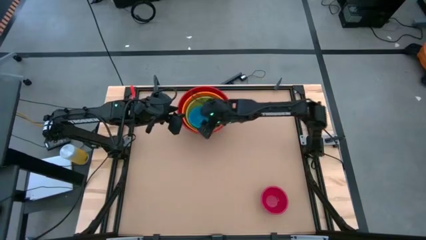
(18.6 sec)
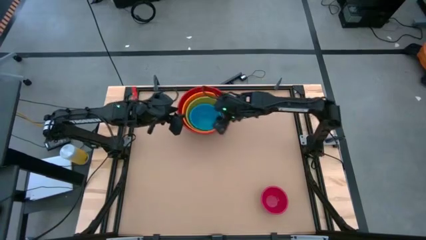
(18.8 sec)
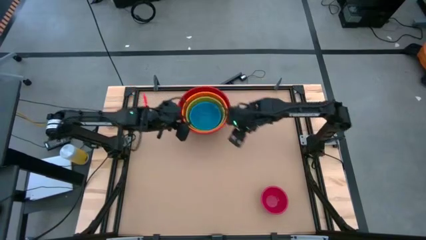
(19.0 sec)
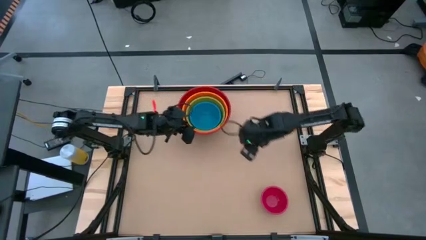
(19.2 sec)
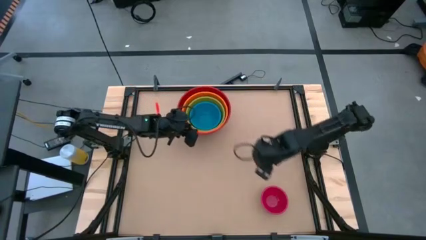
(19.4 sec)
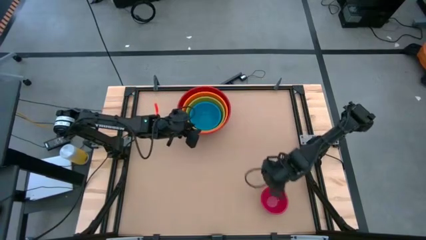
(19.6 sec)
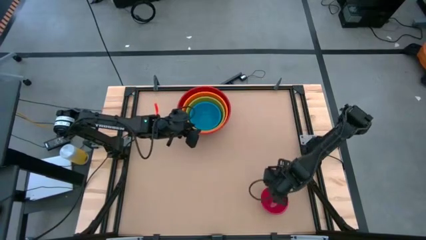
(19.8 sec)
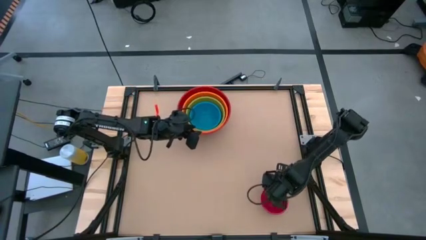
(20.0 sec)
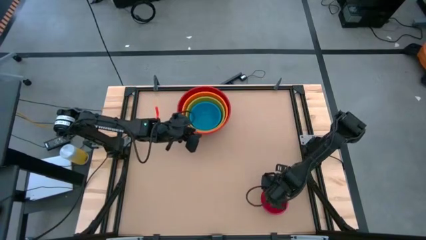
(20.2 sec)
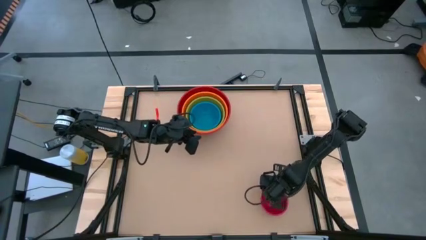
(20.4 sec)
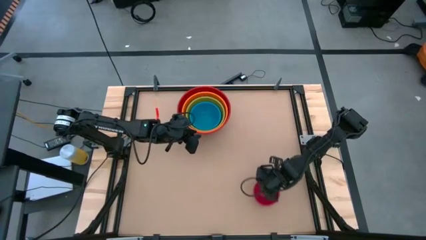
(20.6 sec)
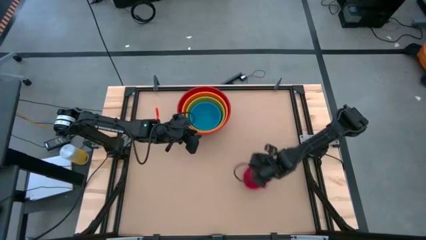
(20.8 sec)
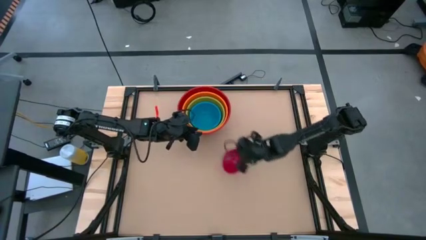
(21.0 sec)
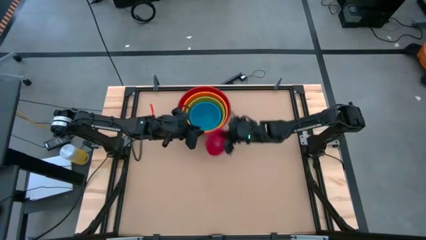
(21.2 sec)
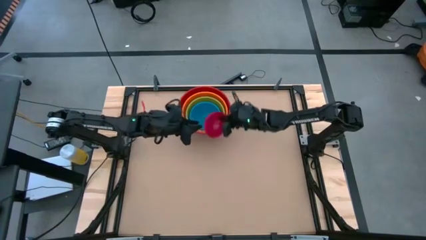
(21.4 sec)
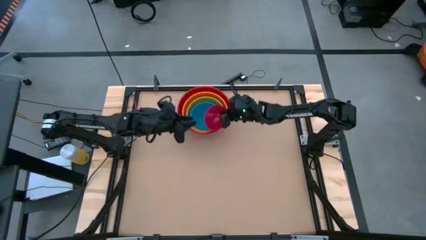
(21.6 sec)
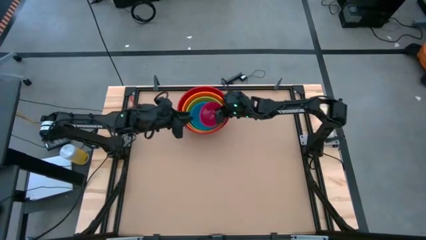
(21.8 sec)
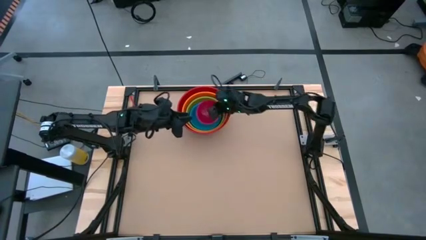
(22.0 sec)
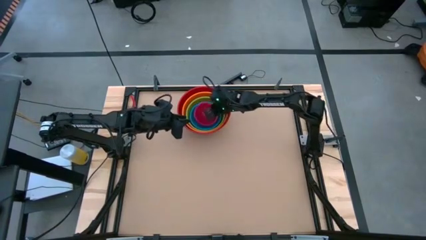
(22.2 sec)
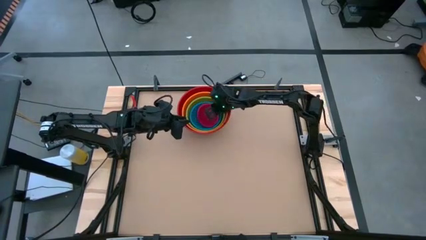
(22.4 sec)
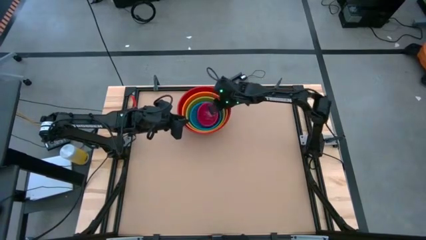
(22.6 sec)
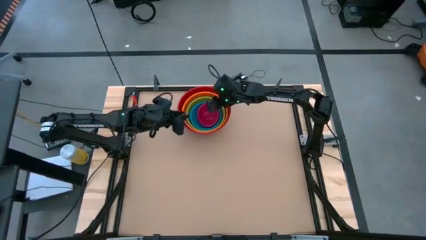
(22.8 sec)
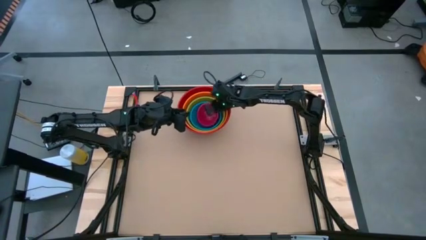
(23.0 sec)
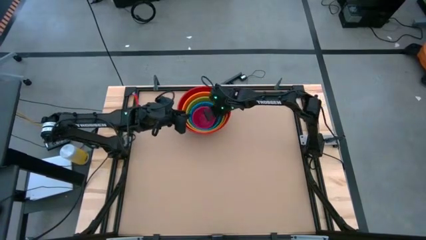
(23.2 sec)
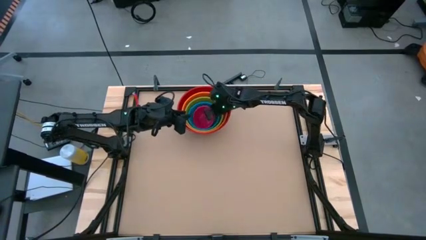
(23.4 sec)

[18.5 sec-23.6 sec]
Stack the pink bowl on top of the blue bowl

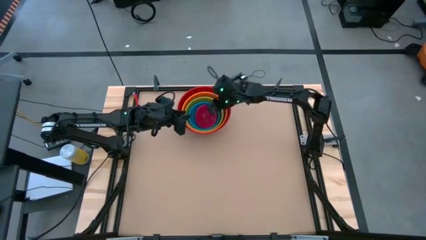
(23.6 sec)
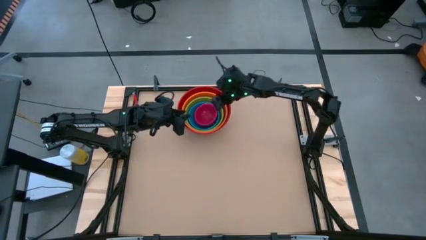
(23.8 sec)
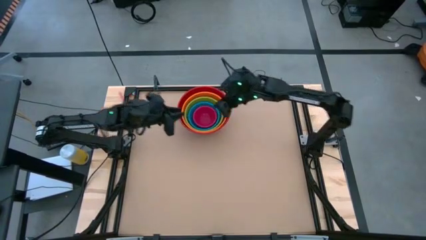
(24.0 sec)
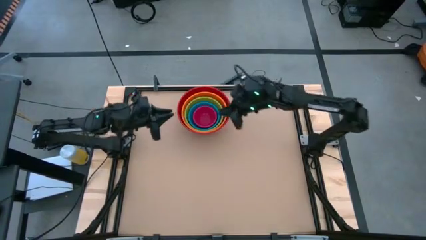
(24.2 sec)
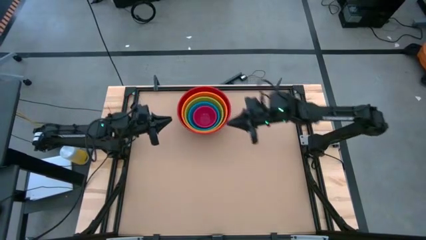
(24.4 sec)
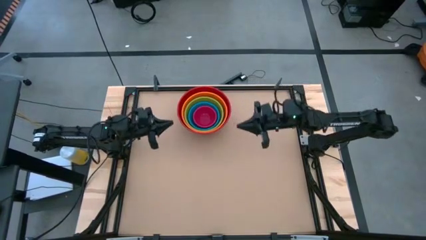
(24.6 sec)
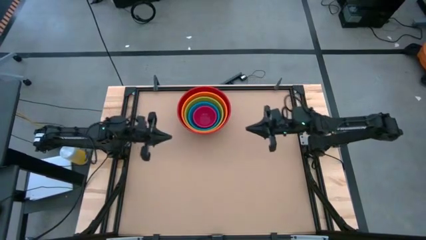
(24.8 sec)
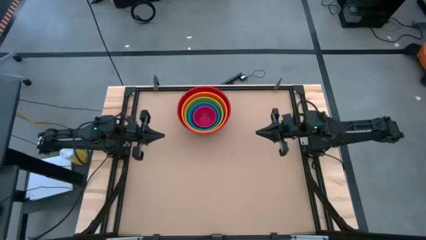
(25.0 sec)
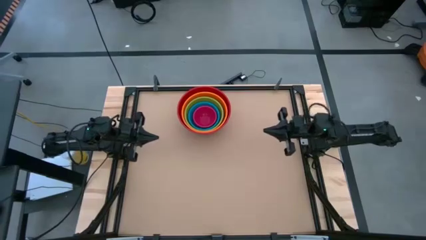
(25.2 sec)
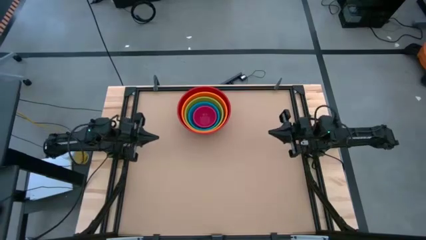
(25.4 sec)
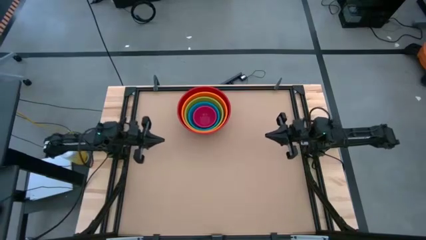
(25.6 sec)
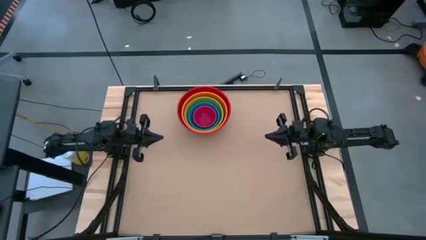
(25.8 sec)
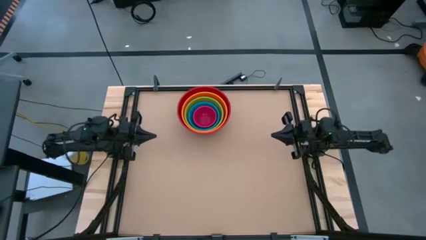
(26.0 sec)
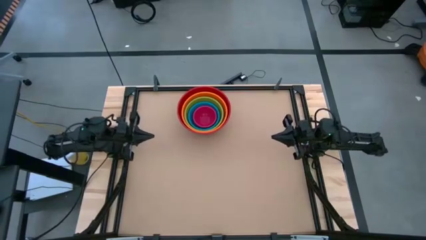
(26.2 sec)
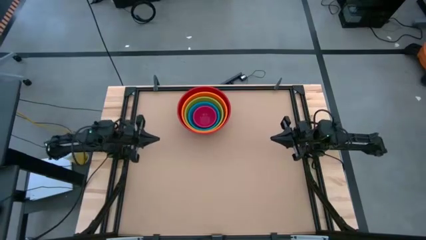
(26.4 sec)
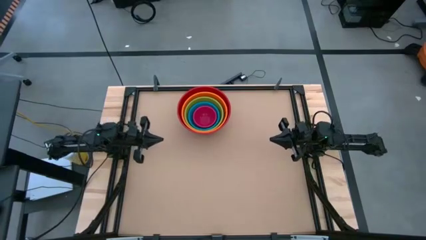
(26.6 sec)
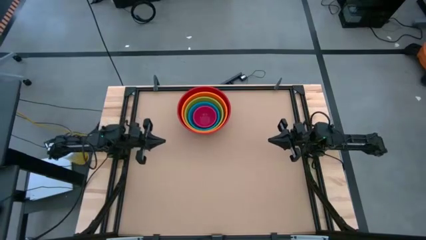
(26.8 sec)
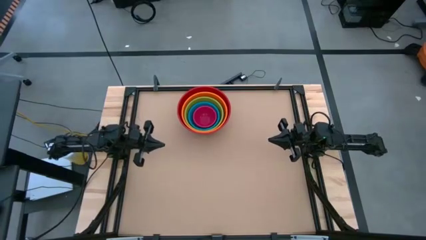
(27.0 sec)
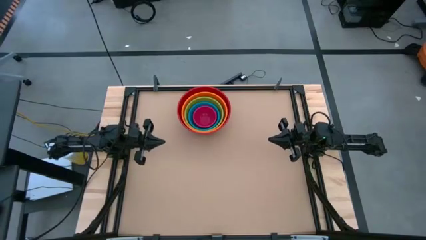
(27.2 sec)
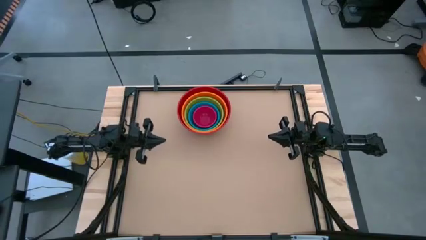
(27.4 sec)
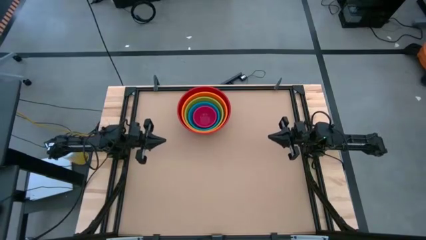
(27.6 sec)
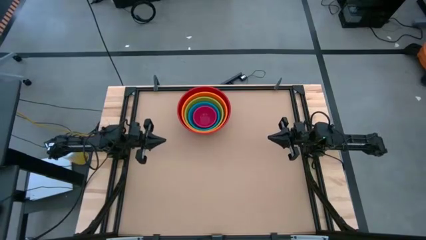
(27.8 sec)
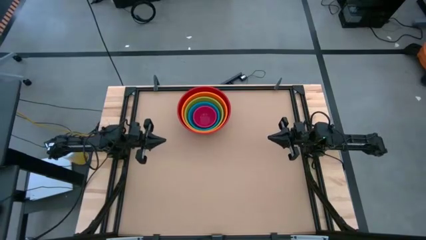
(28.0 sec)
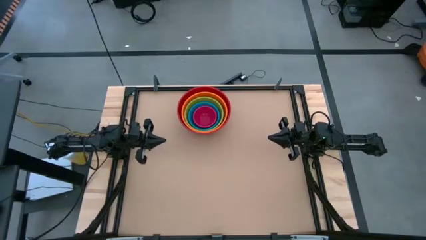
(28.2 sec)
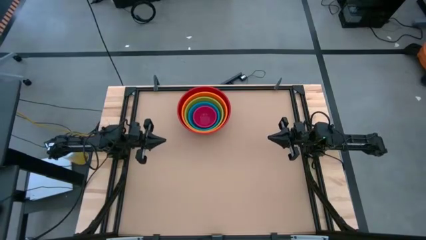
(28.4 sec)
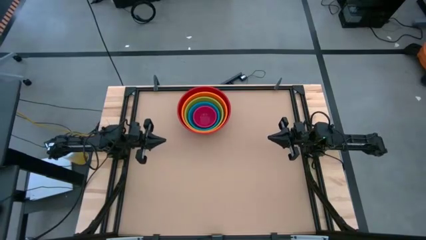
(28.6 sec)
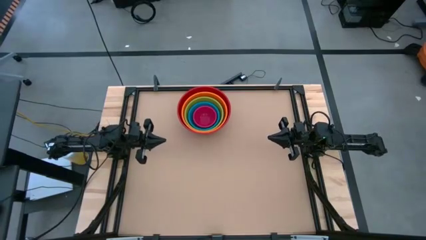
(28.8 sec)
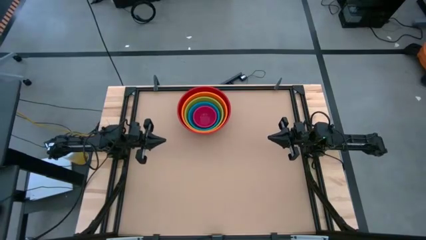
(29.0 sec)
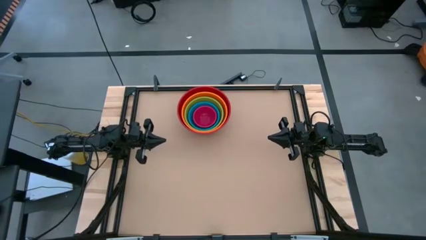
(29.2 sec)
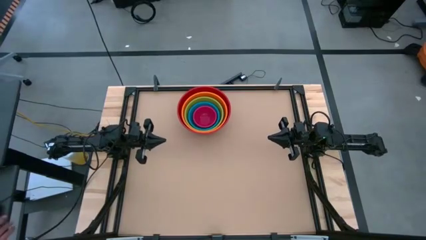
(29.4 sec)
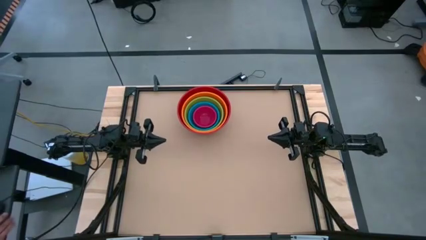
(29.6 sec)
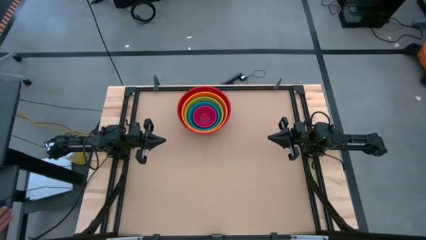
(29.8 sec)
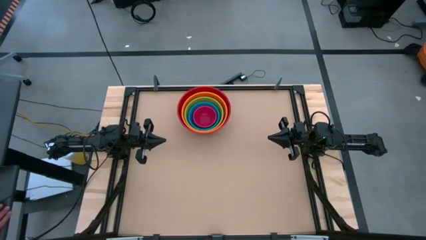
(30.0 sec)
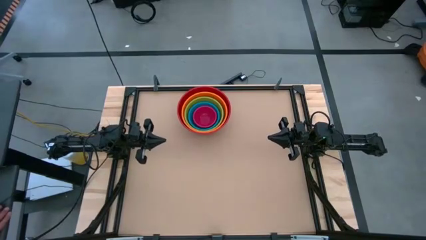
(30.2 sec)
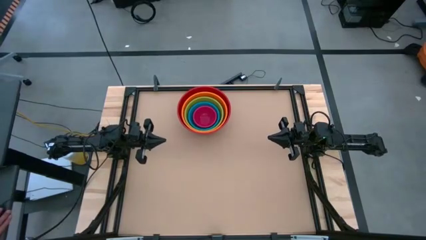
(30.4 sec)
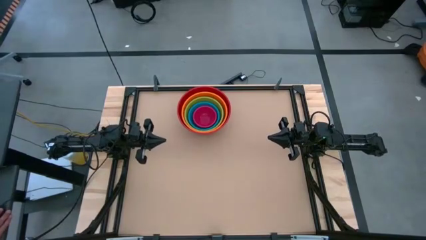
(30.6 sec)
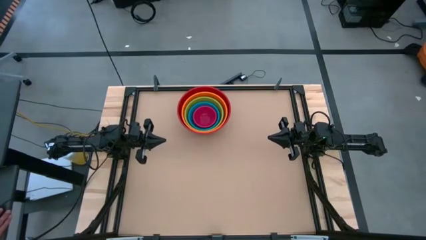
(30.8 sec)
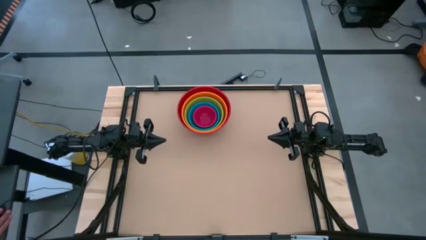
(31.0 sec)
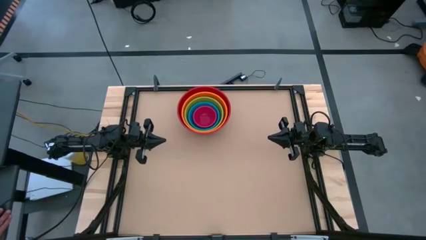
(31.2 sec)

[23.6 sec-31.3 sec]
Return to Home Position

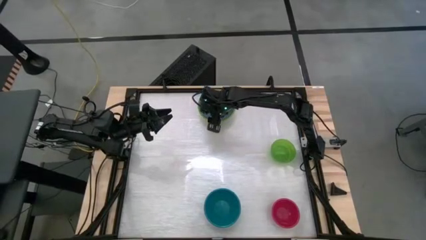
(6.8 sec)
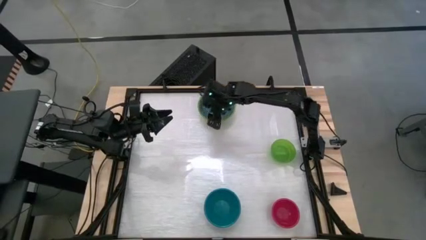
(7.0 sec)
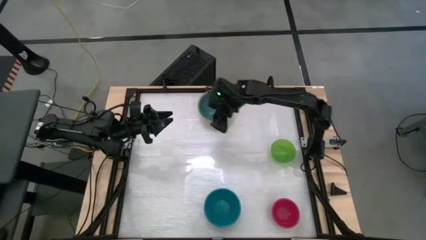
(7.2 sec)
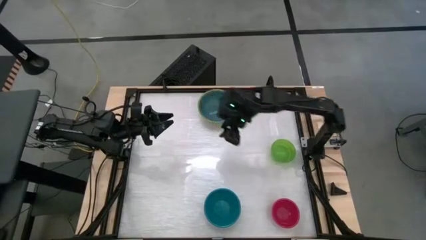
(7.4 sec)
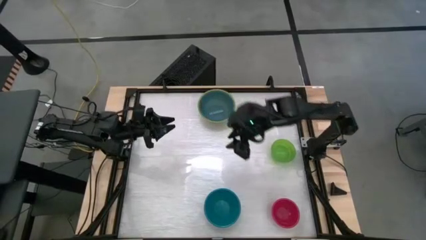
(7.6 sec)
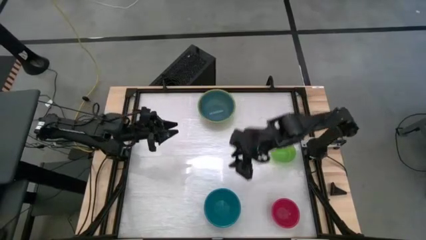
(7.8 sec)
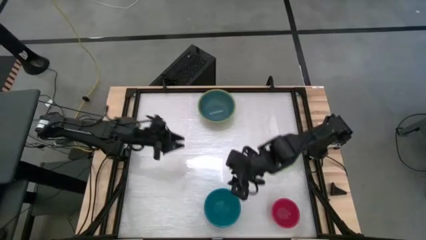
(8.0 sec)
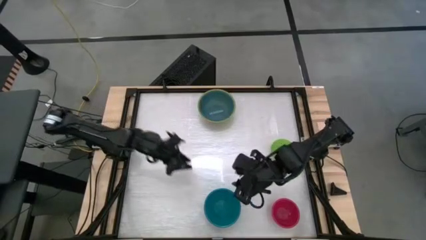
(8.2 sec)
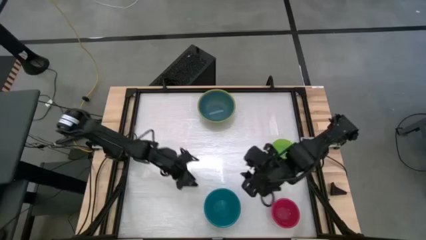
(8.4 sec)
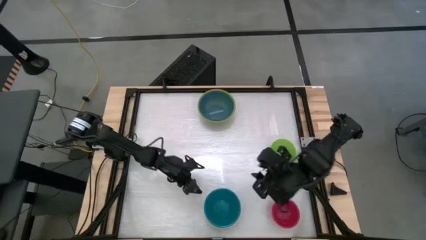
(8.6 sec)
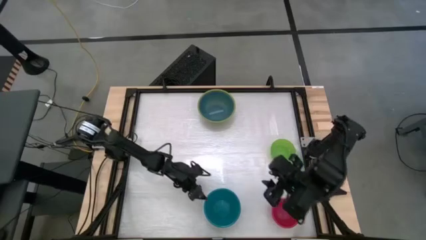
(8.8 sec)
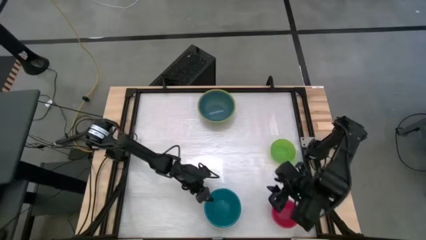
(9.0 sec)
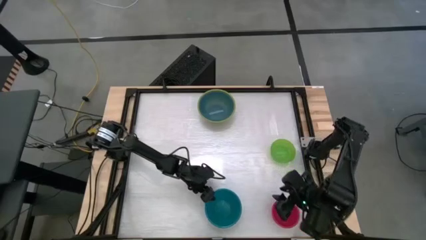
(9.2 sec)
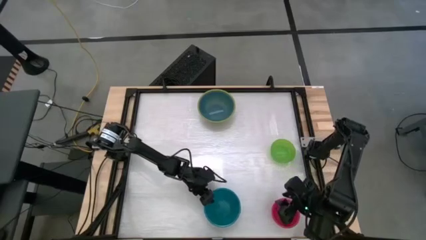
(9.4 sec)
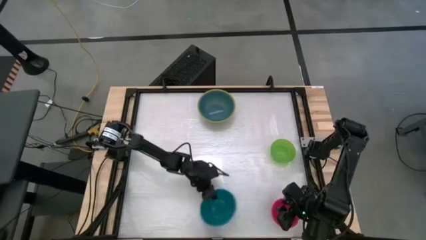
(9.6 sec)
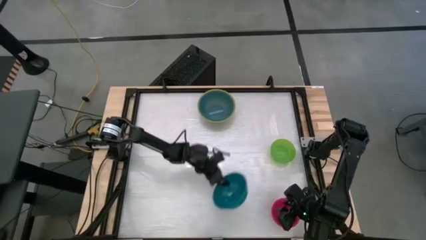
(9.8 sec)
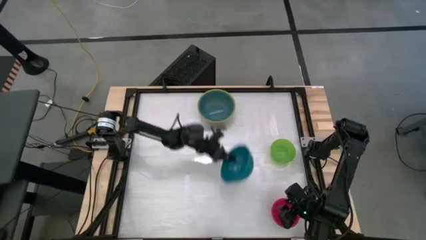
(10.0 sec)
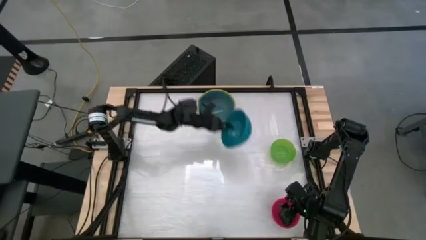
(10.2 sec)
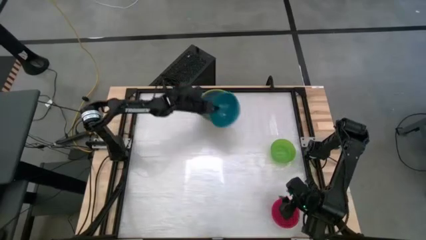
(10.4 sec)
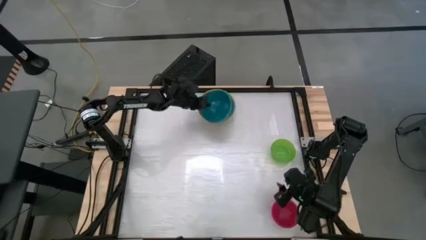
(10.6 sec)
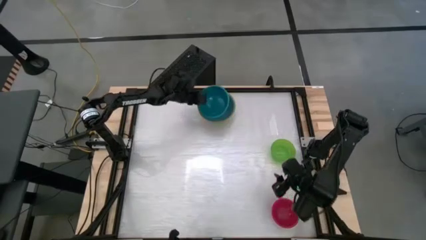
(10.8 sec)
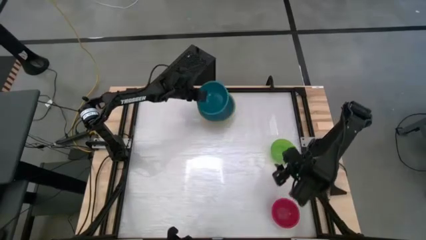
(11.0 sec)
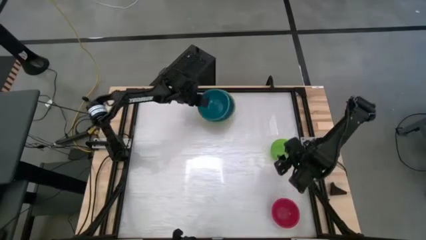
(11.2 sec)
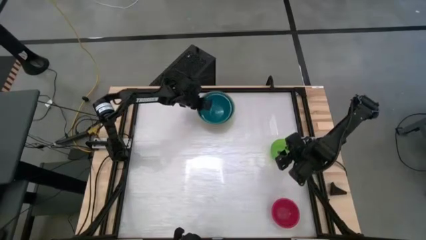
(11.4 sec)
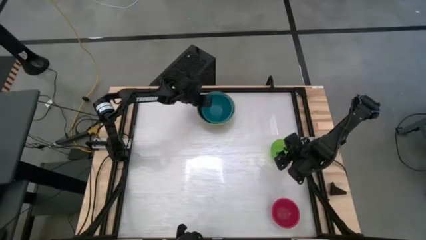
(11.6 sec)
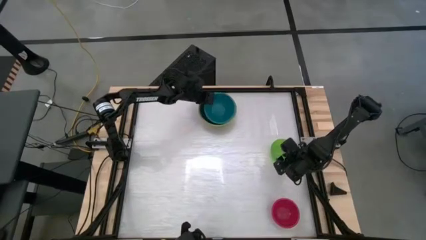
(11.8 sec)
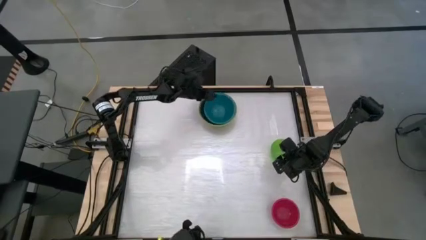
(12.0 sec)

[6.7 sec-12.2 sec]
Stack the dark blue bowl on top of the light blue bowl
